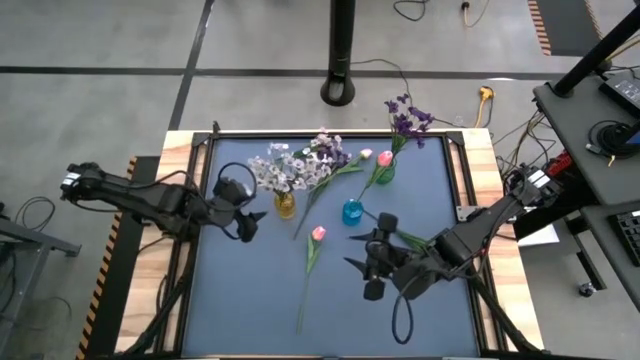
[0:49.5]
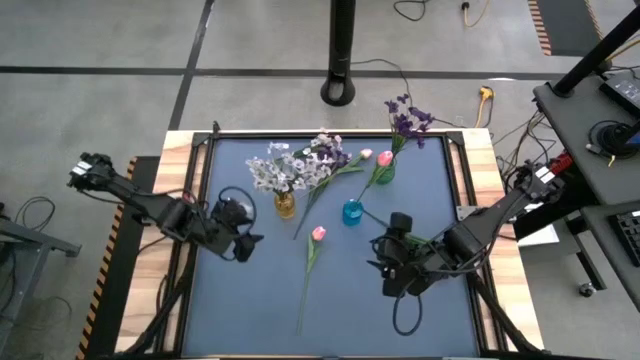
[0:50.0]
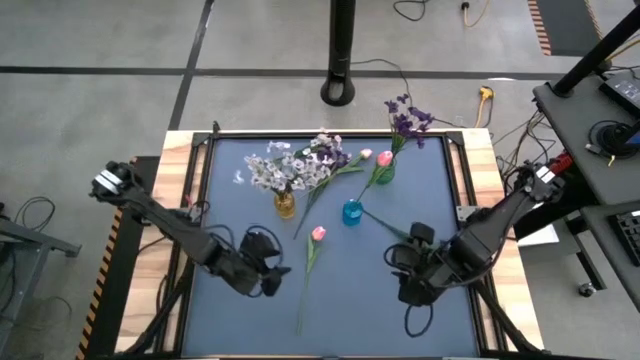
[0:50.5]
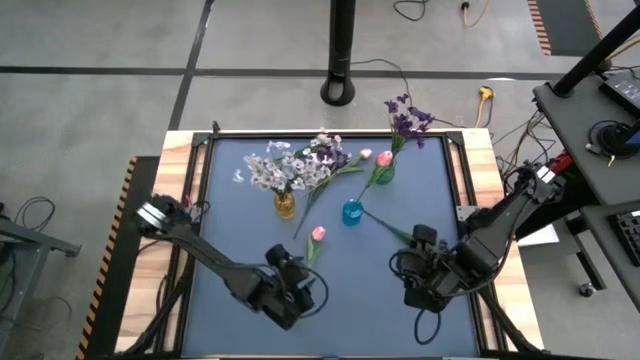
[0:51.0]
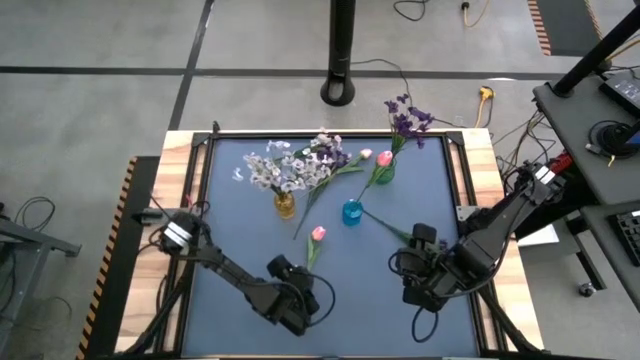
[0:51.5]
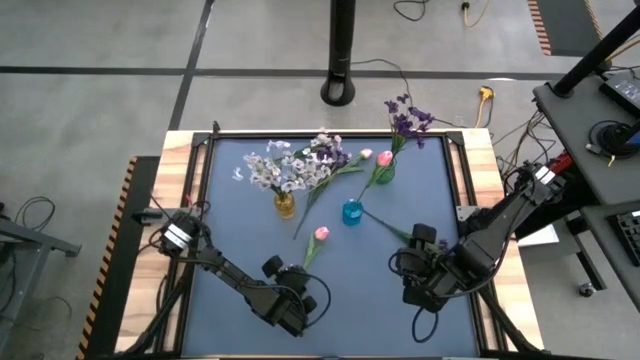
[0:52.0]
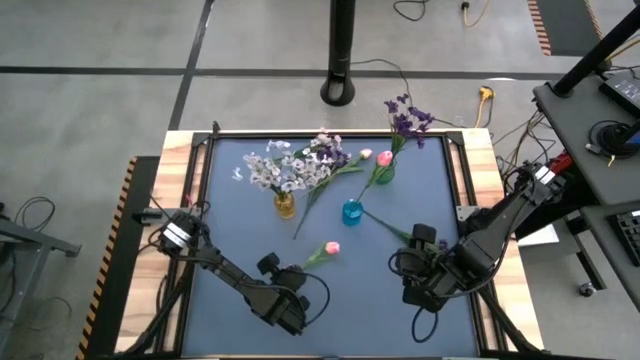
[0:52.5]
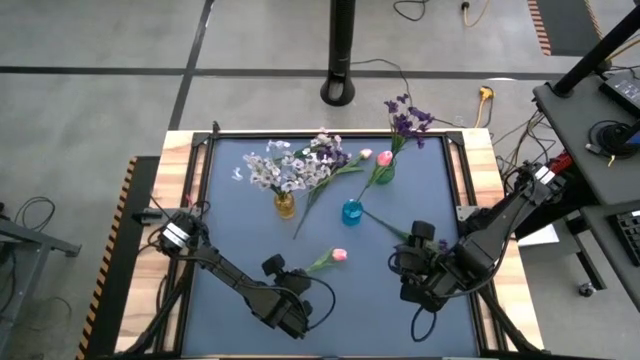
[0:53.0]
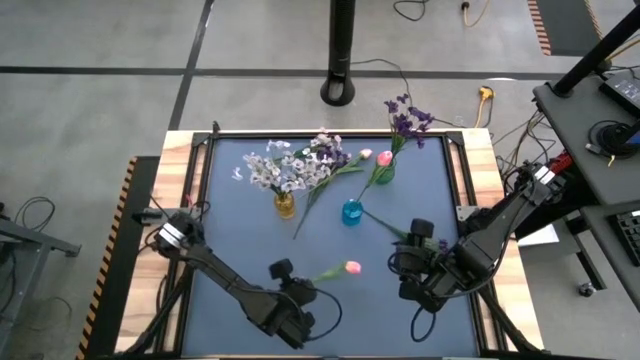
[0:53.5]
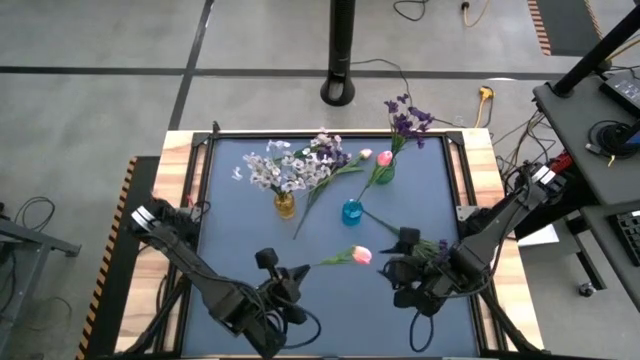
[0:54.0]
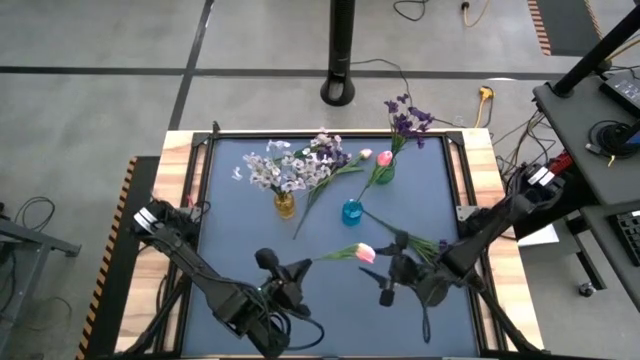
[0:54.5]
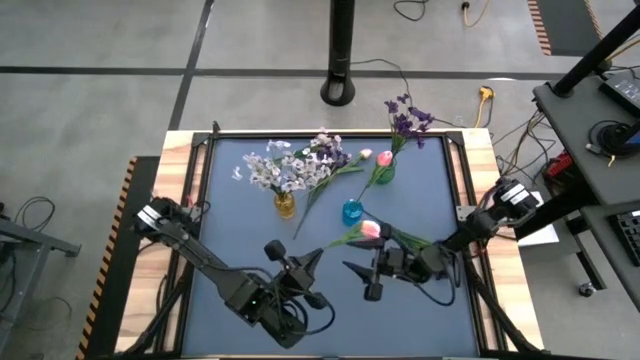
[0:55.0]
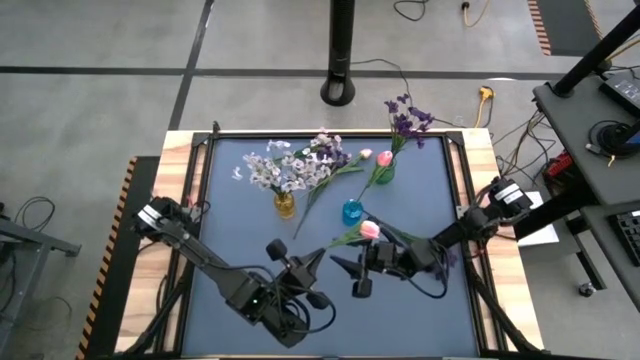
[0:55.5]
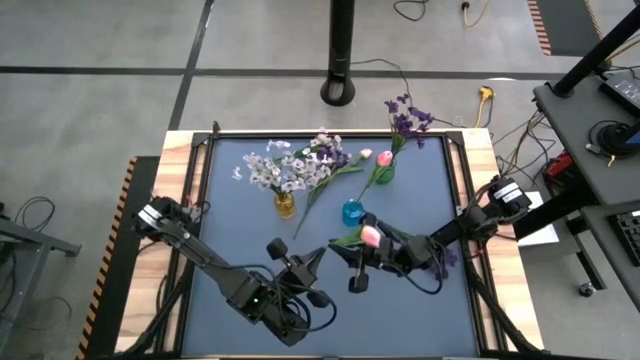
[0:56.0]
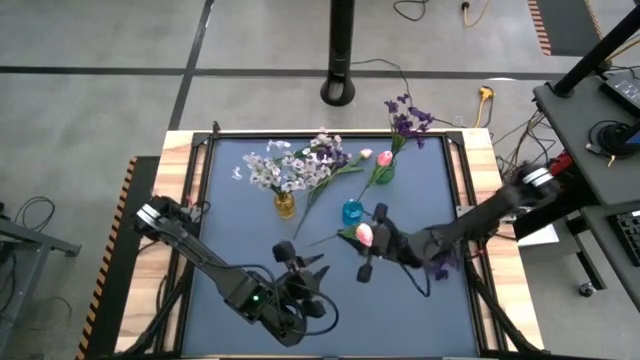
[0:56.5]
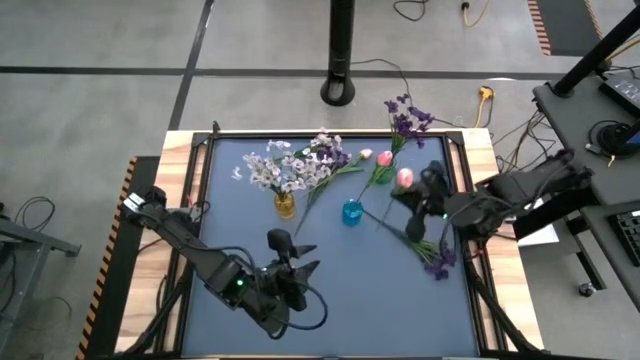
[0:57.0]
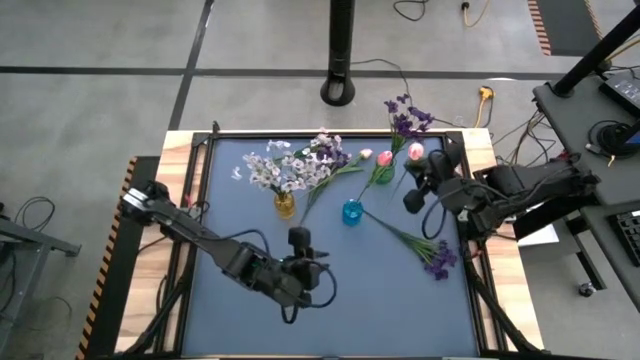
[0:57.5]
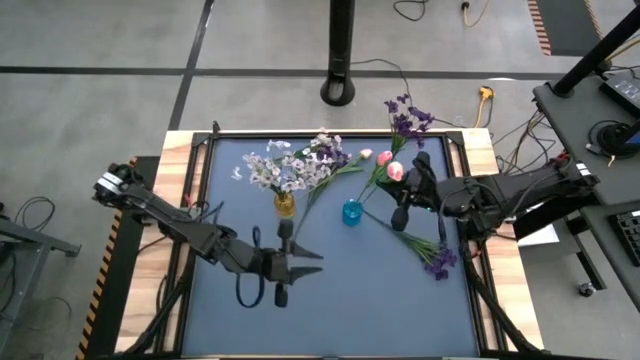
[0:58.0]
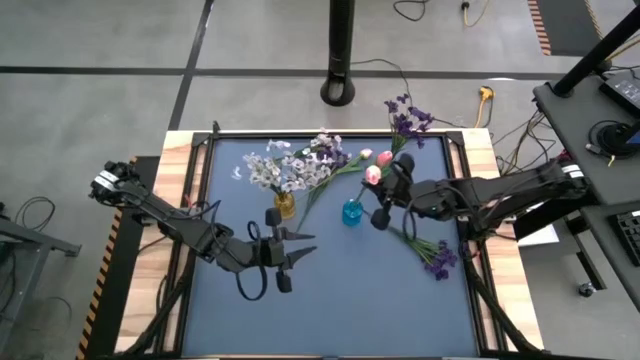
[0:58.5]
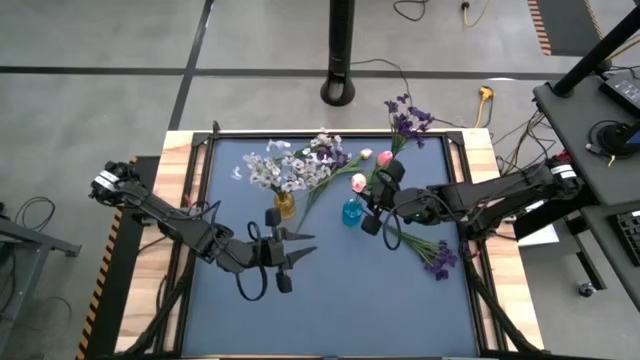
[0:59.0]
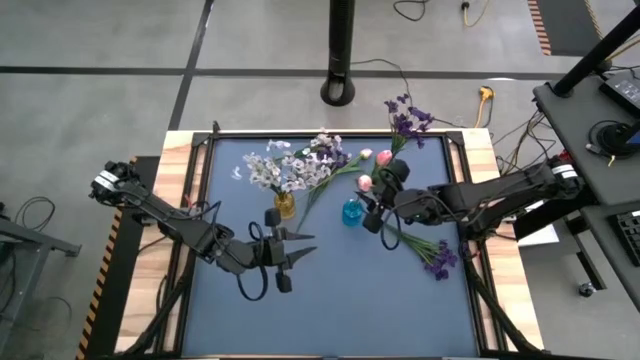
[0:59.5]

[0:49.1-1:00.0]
Task: Sort flowers into vase by color
Put the bottom pink tulip into the blue flower vase

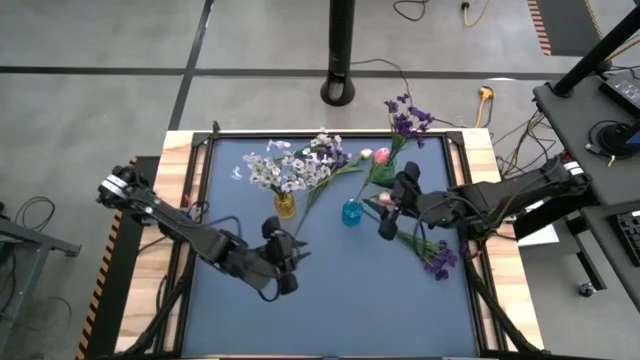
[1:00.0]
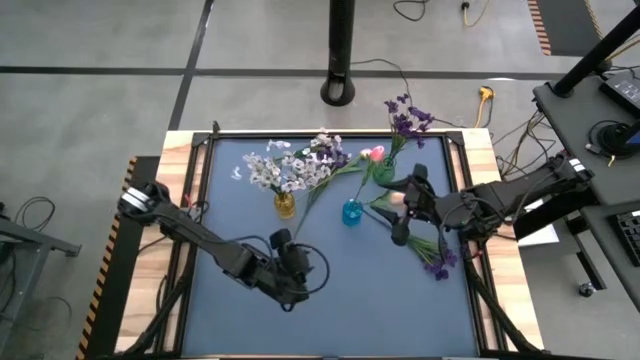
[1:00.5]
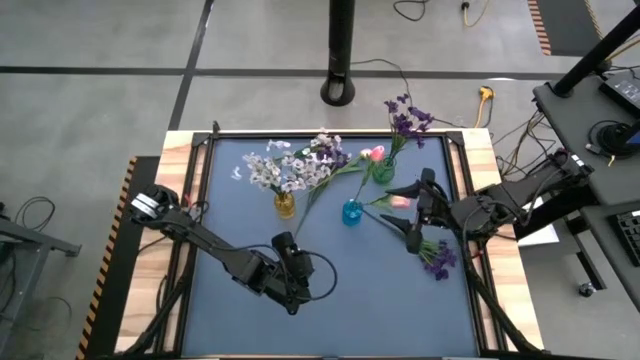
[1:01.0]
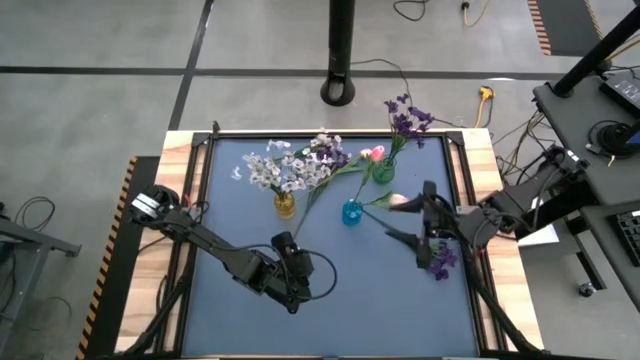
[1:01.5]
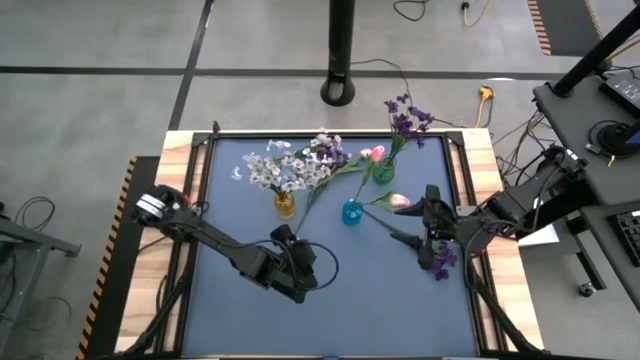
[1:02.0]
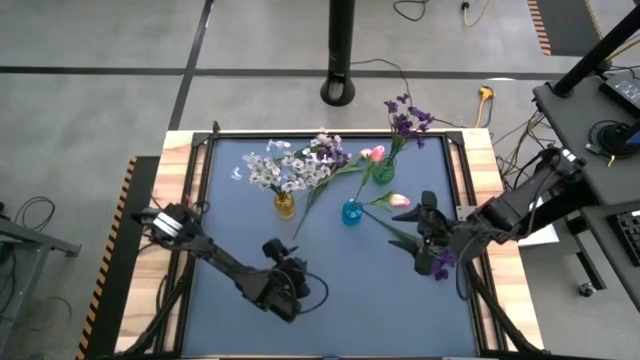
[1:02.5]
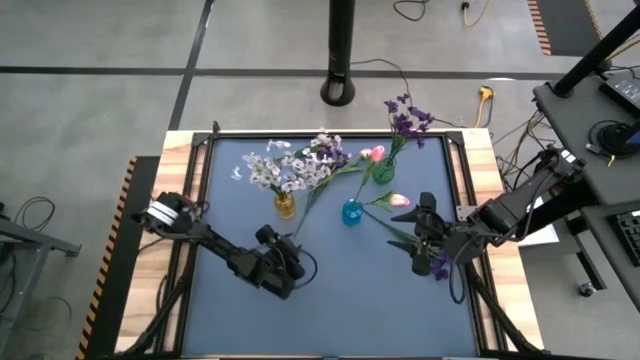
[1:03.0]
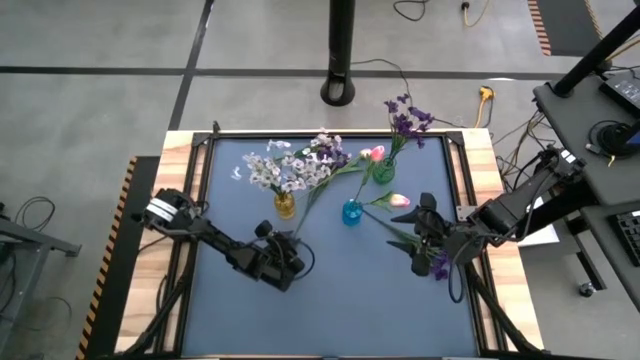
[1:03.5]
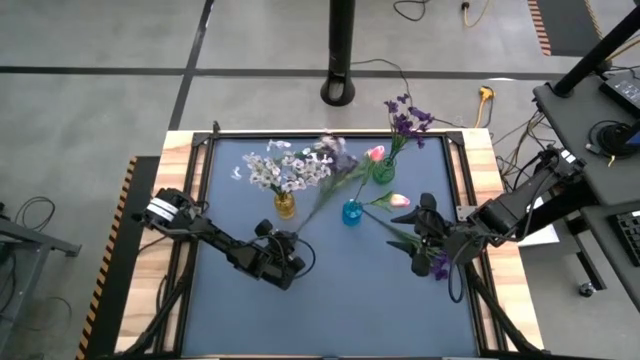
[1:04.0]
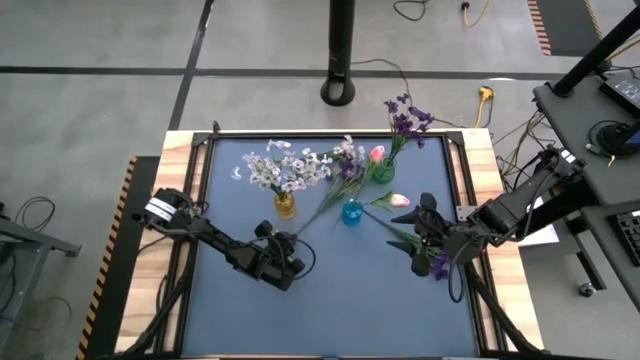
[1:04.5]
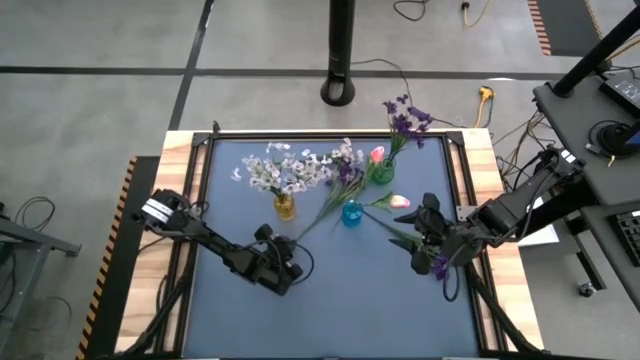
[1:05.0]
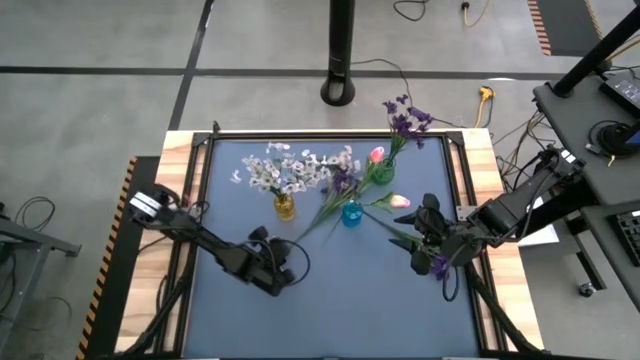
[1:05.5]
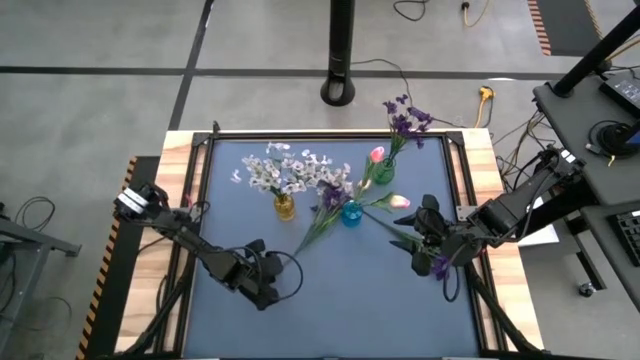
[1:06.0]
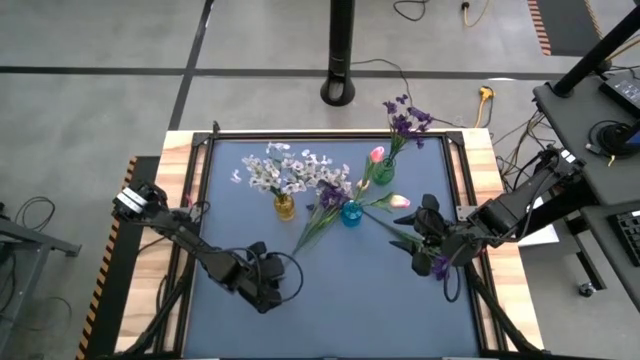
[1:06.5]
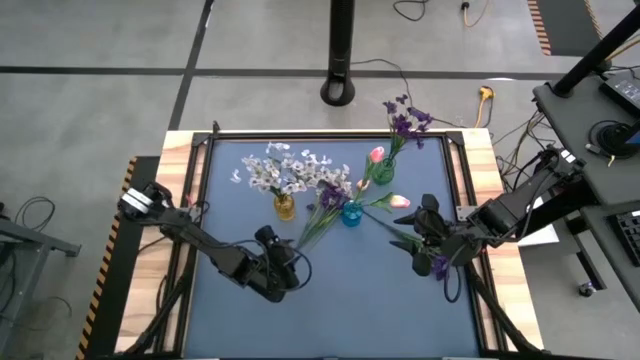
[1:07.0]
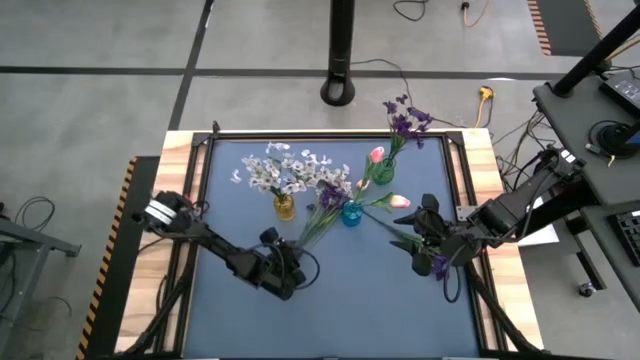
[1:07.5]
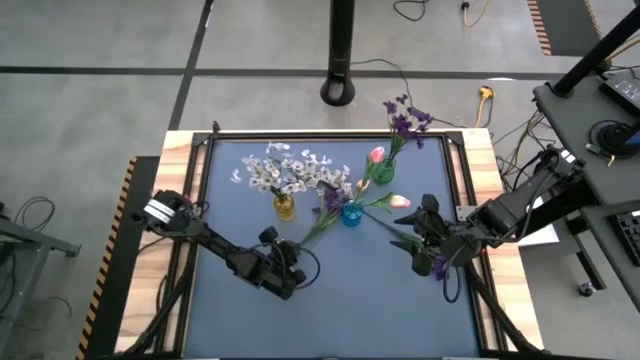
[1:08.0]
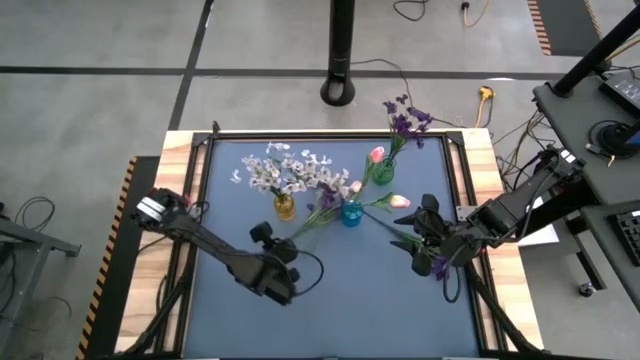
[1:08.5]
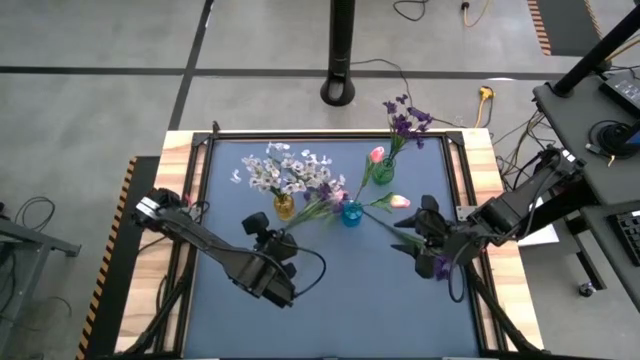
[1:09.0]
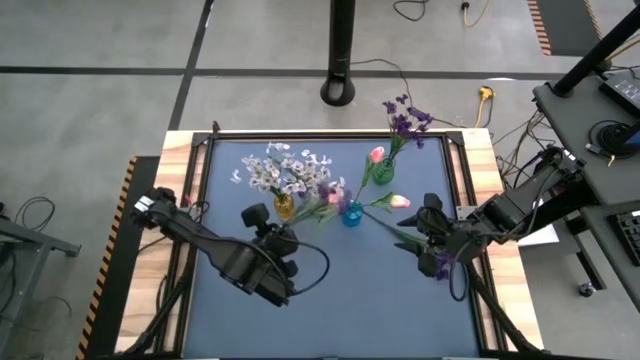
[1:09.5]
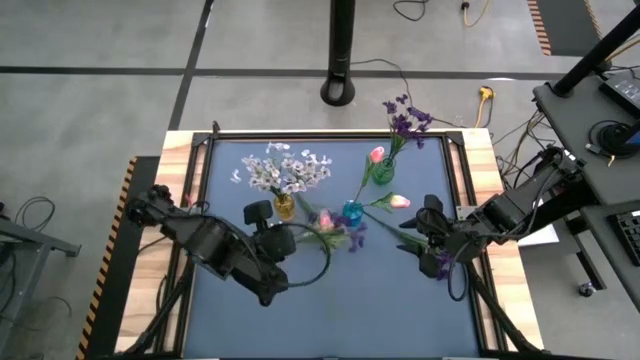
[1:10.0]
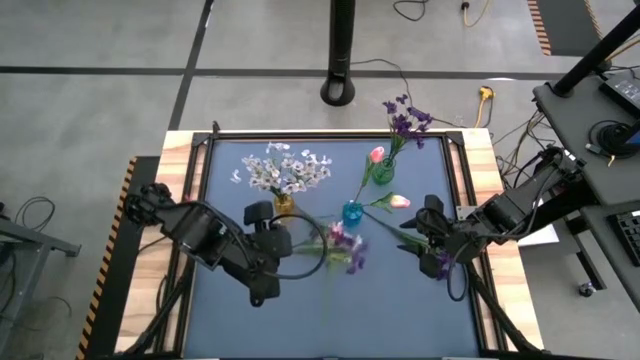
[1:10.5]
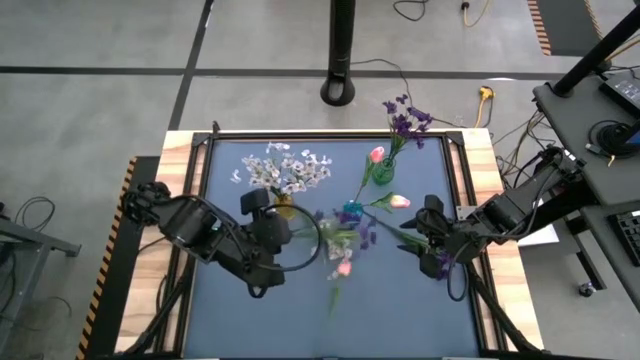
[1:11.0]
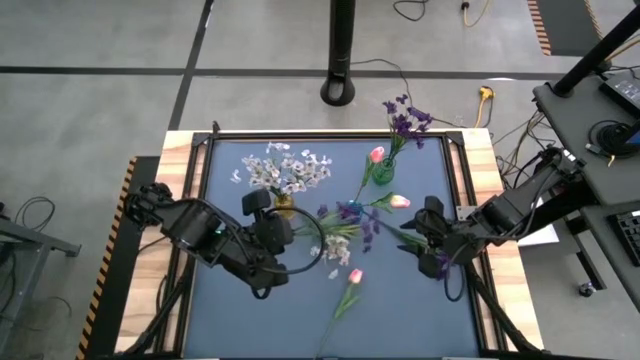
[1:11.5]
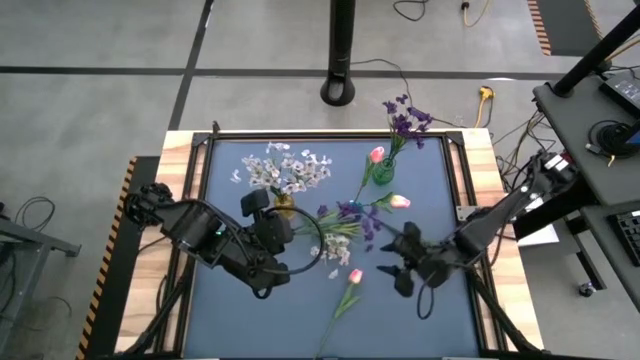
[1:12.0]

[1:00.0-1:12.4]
Put the top violet flowers into the green flower vase
